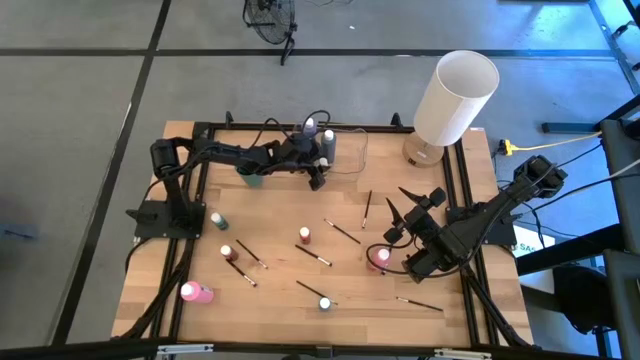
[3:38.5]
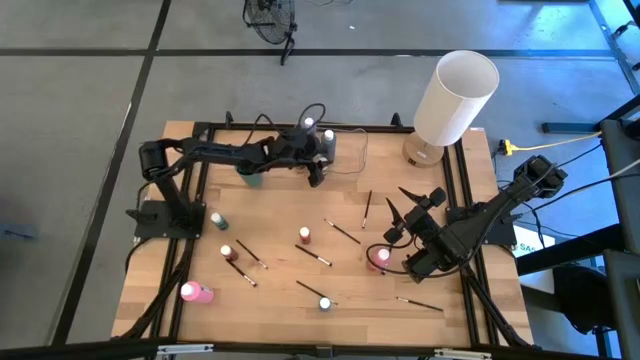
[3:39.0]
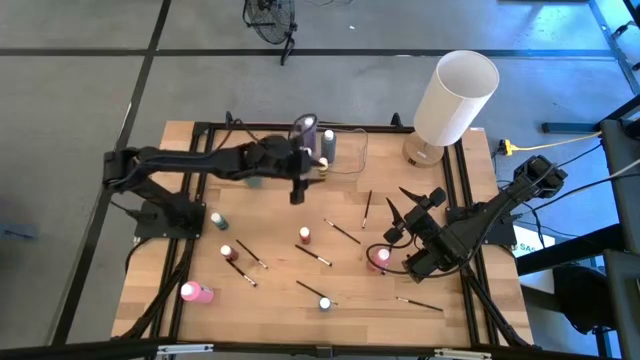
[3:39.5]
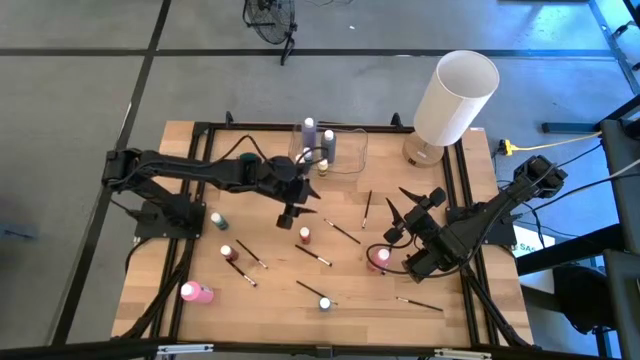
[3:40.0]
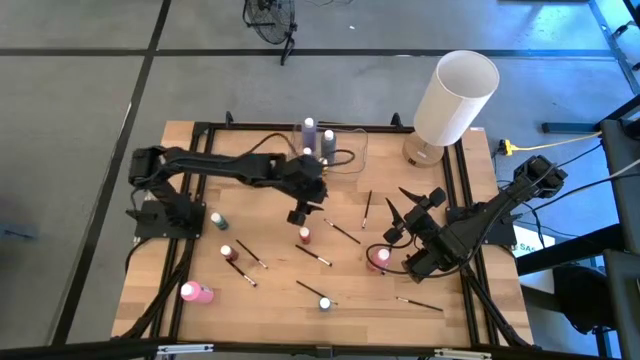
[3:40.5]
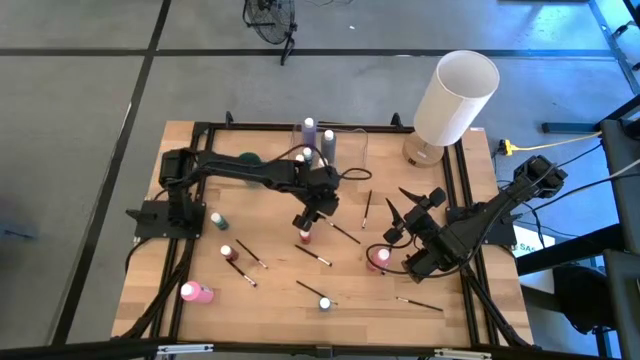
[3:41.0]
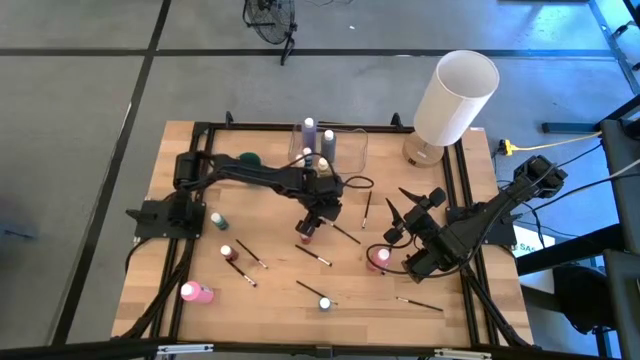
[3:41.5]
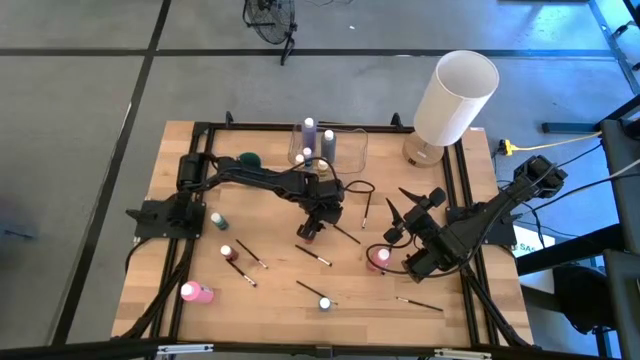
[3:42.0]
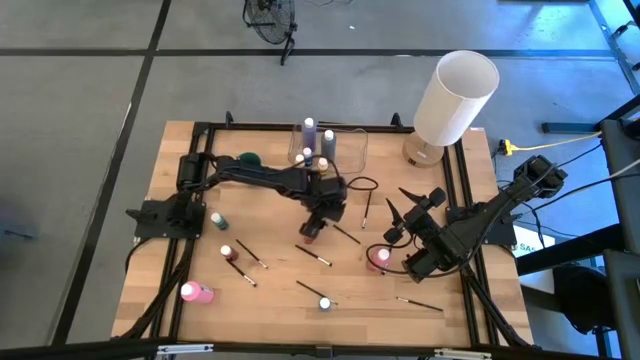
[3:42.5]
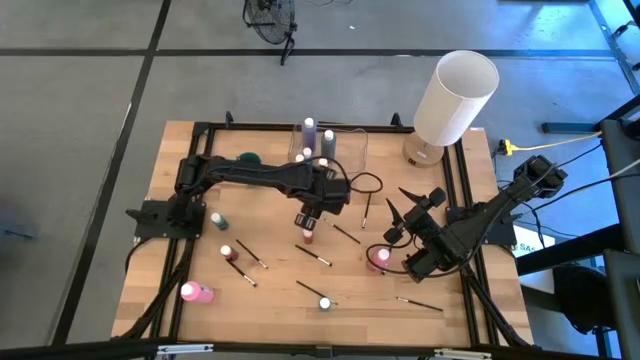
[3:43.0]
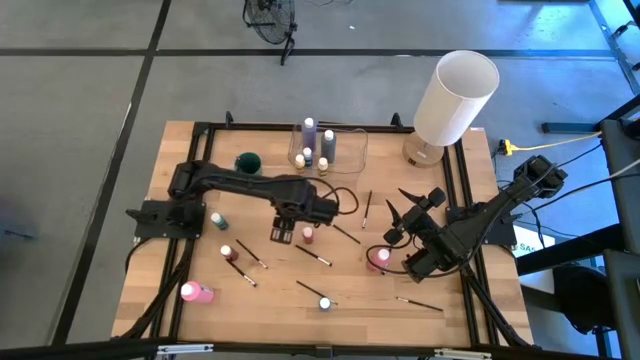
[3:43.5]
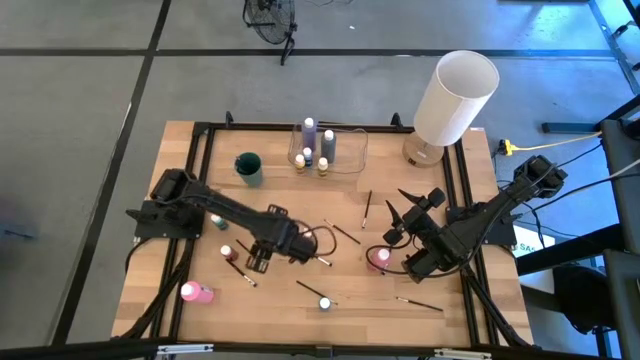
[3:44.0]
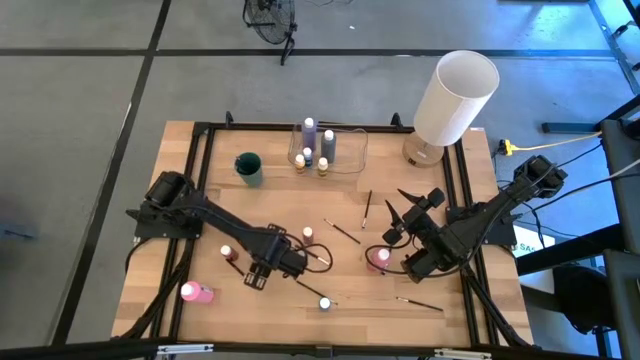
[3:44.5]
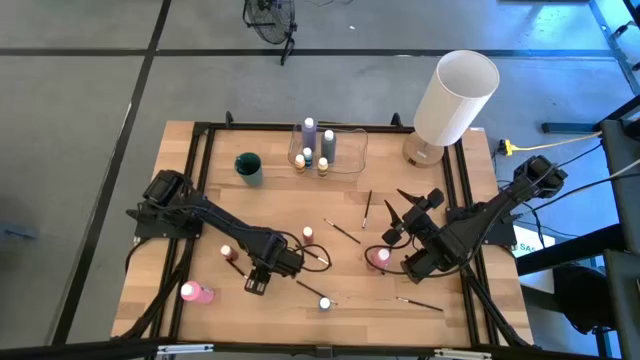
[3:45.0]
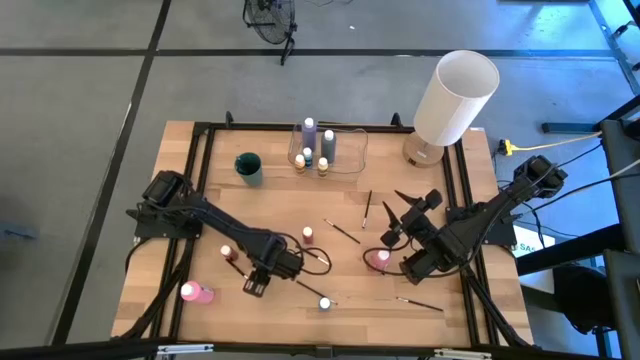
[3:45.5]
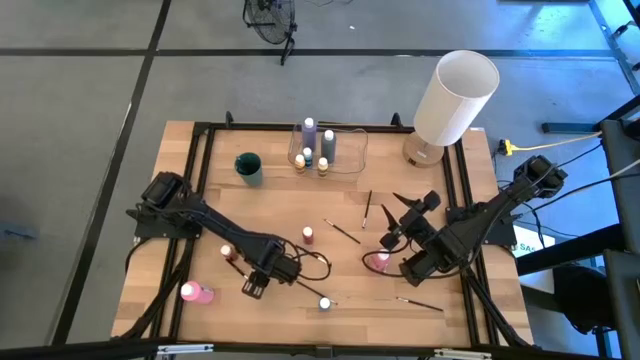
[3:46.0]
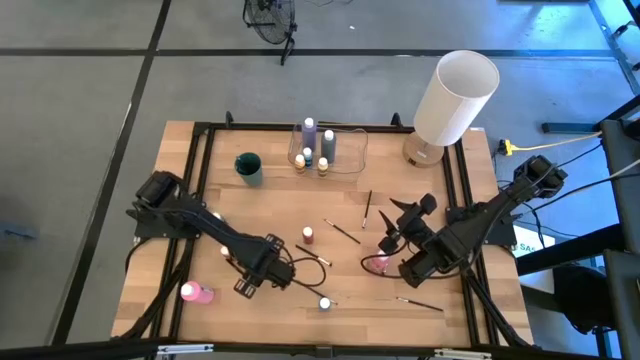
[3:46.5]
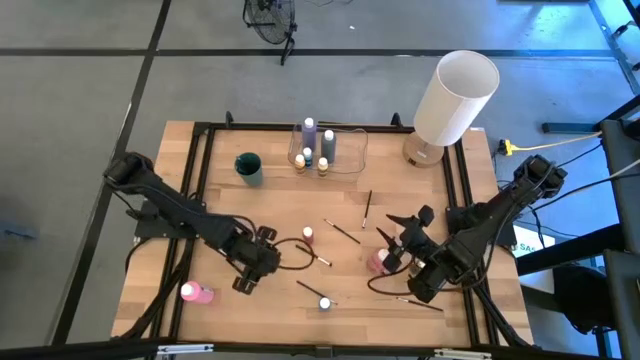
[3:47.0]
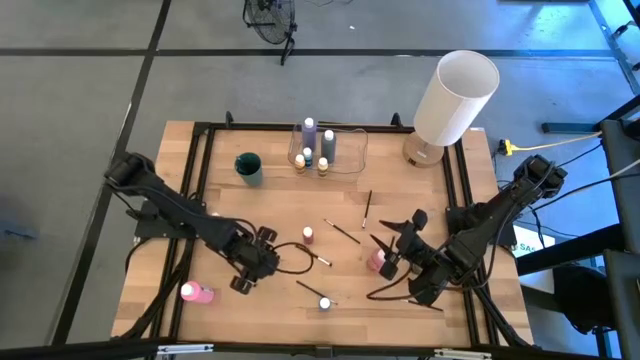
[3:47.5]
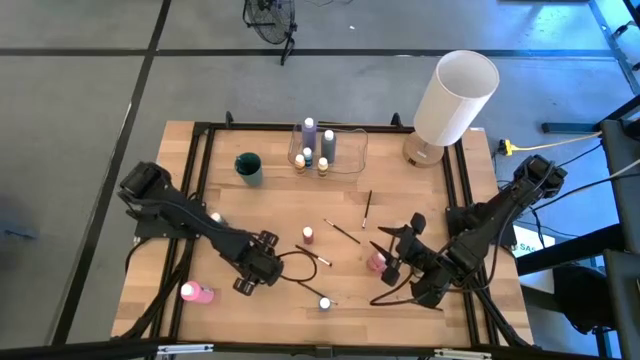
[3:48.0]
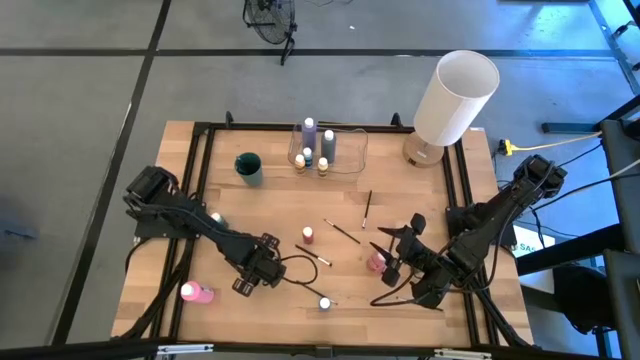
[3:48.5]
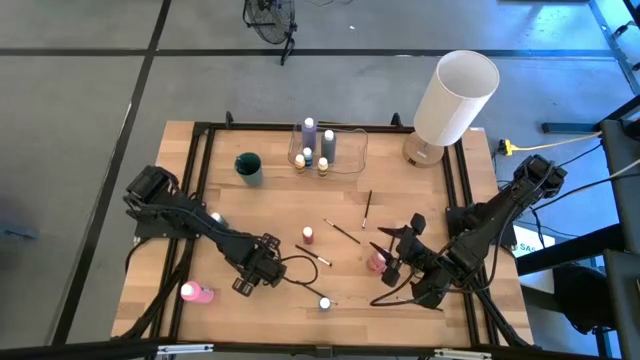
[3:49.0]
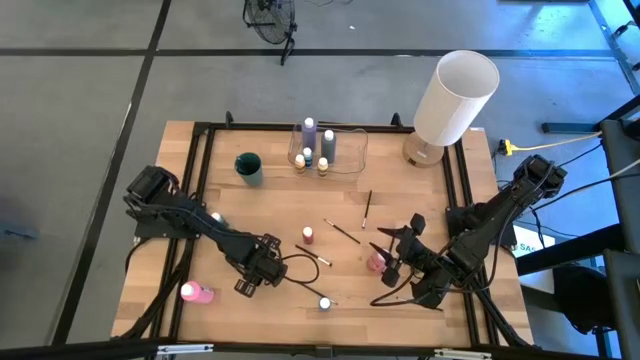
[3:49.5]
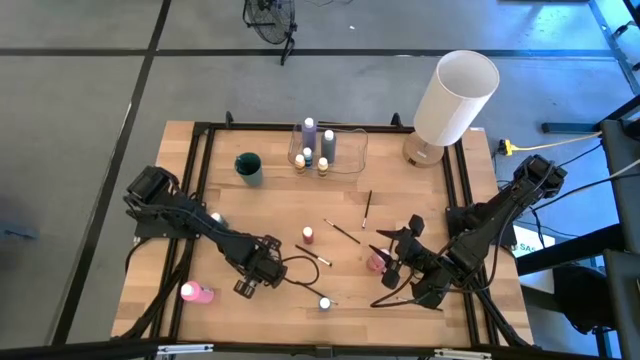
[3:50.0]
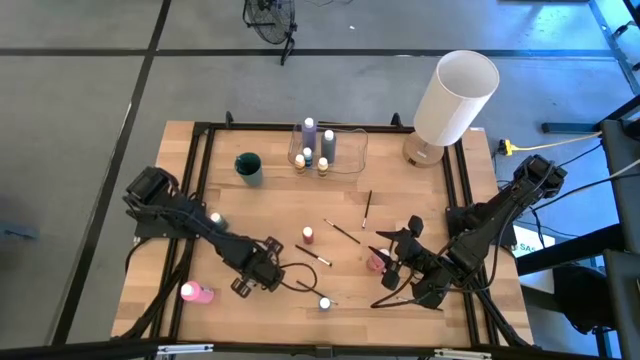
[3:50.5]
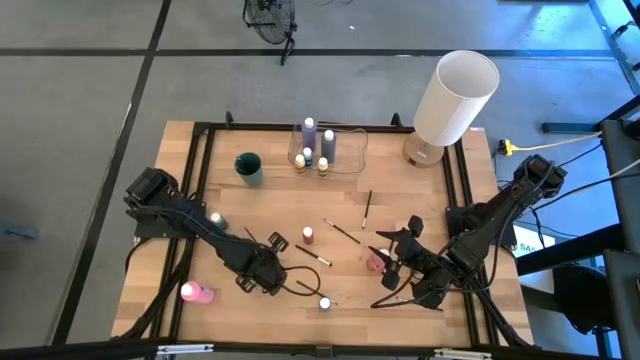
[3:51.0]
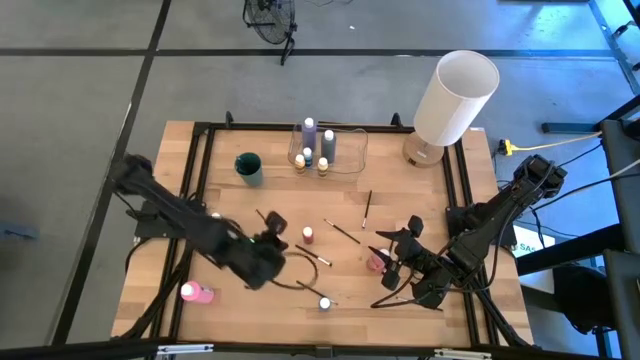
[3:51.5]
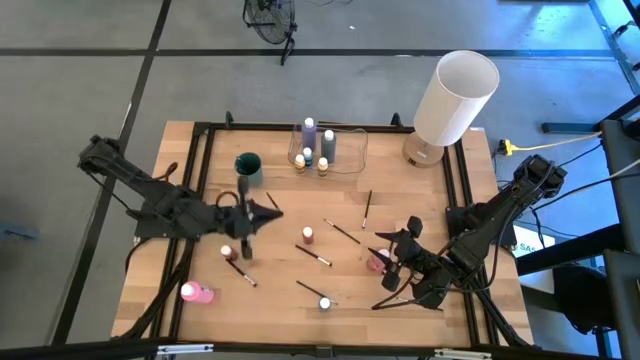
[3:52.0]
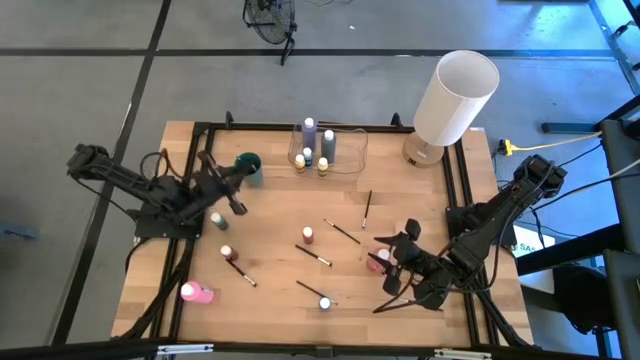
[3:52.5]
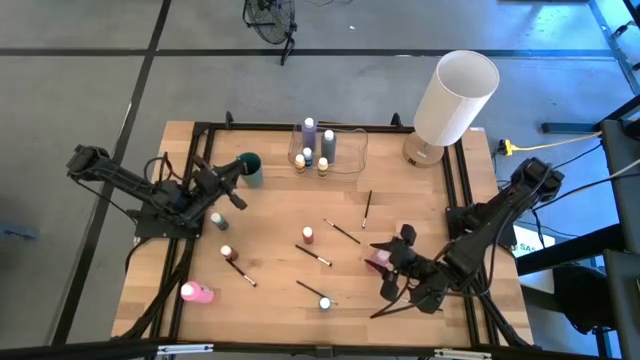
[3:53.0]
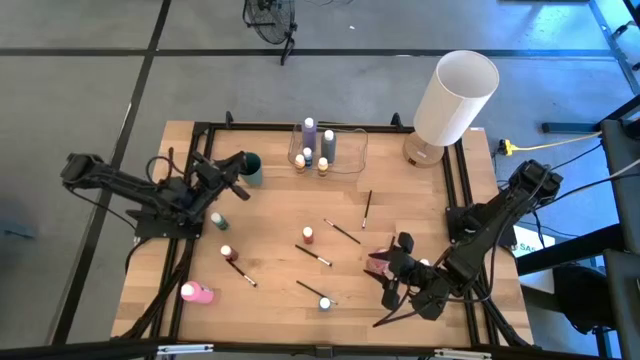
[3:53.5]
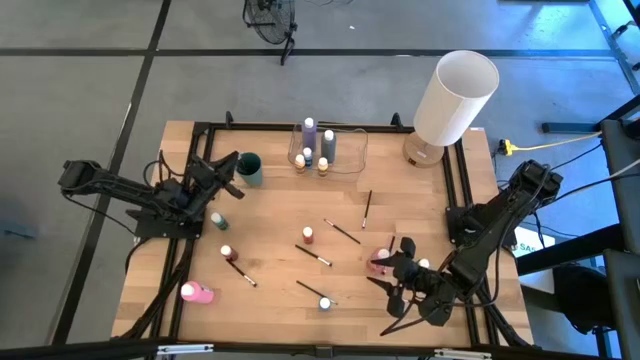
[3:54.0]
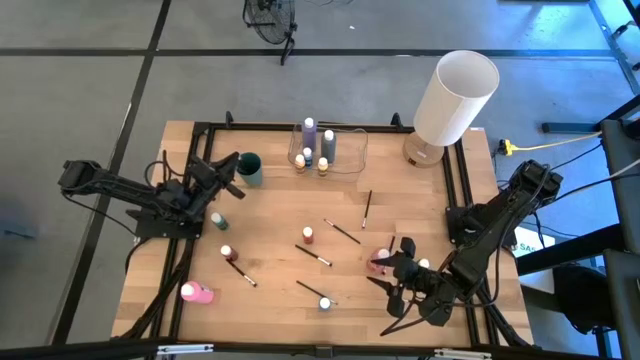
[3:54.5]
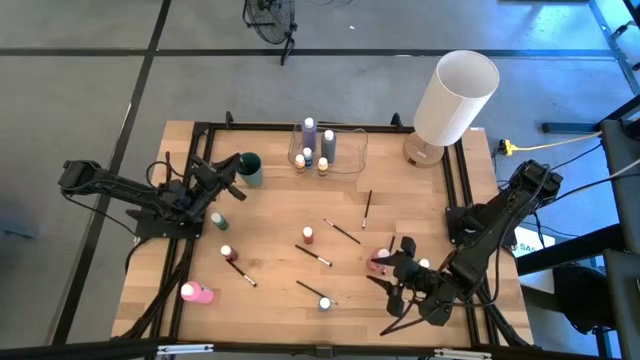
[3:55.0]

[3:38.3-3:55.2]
Task: Pick & Place Paint Supplies
Put the silver paint brush into the green cup

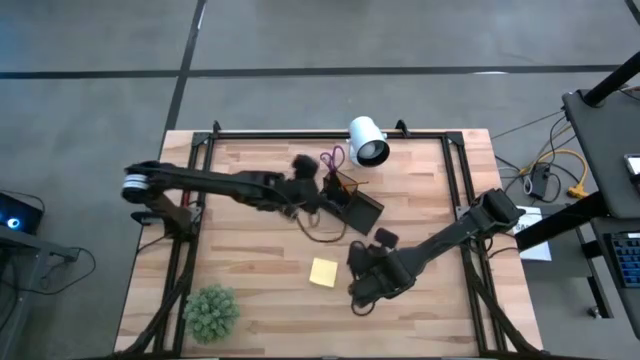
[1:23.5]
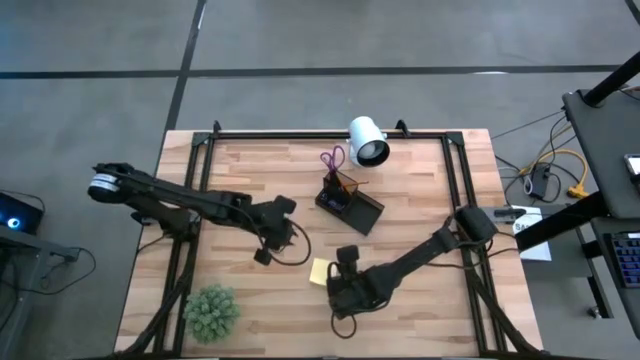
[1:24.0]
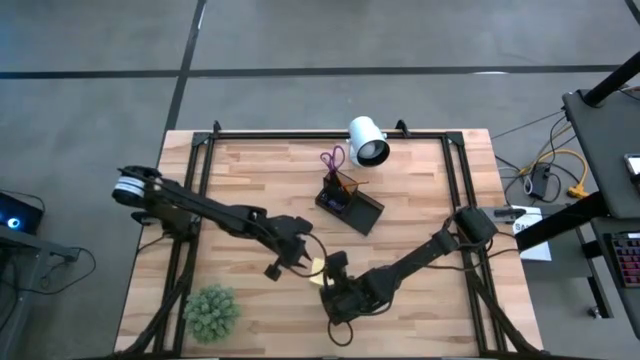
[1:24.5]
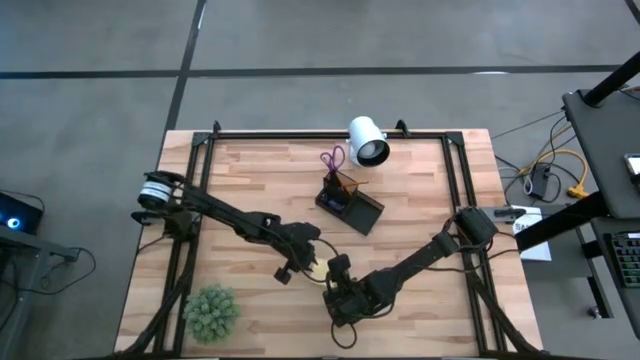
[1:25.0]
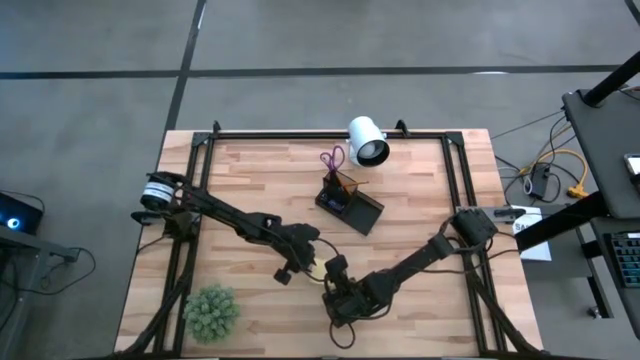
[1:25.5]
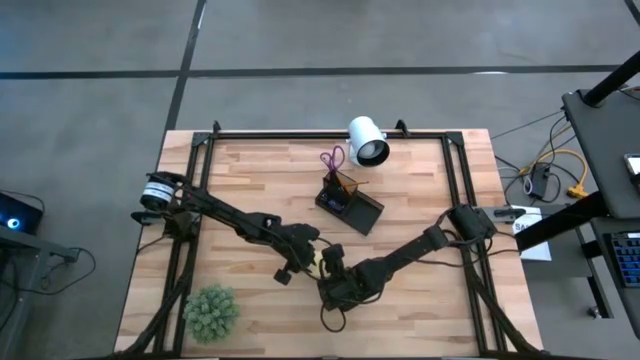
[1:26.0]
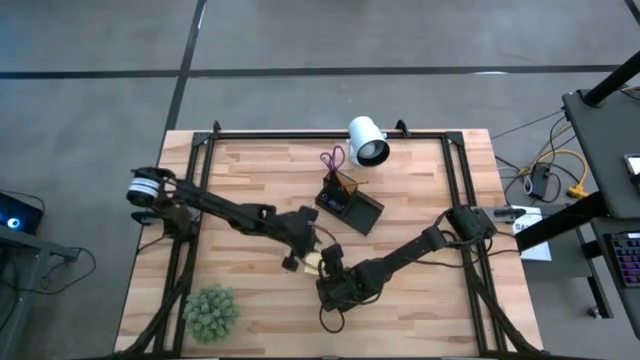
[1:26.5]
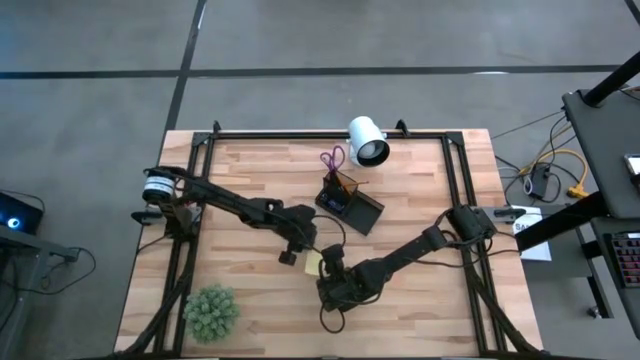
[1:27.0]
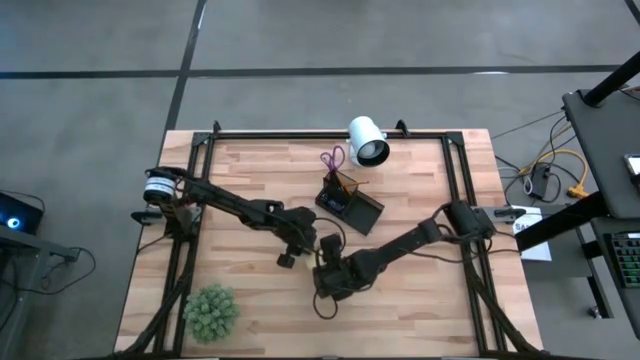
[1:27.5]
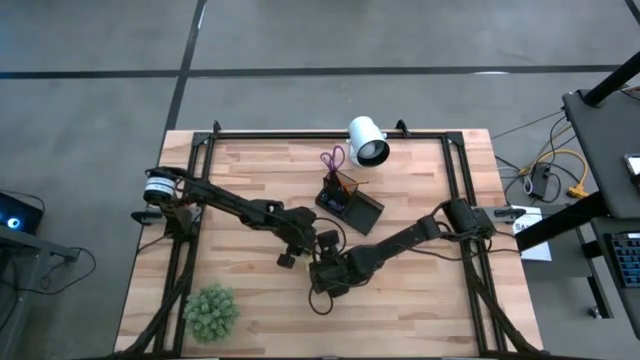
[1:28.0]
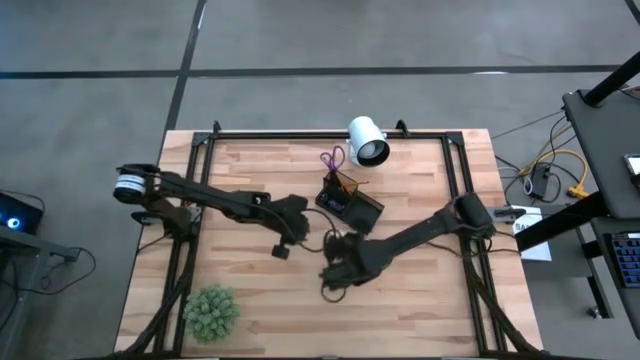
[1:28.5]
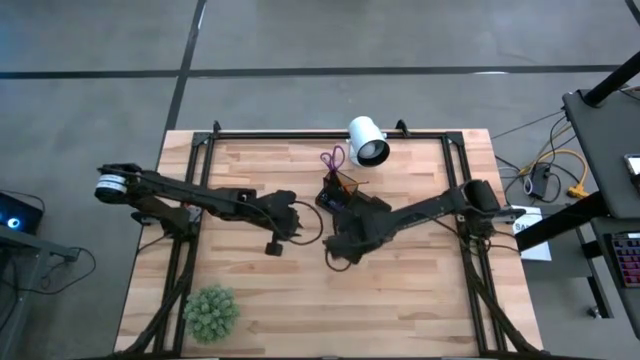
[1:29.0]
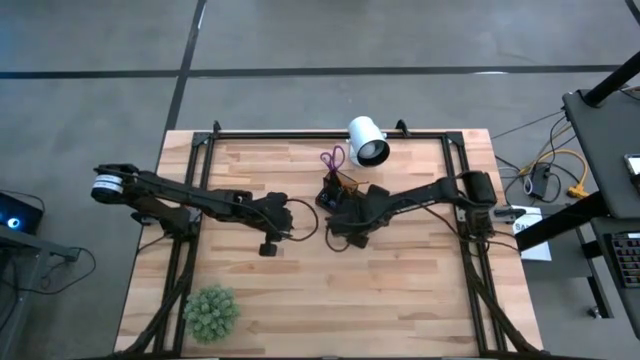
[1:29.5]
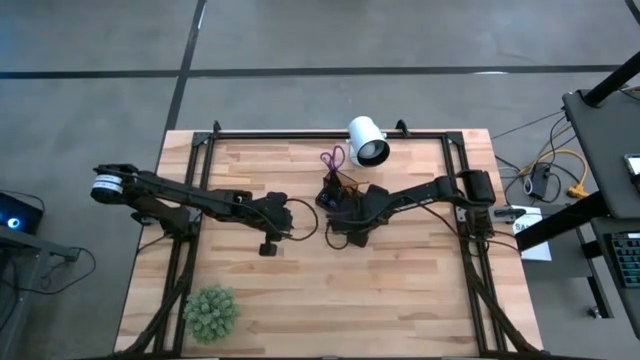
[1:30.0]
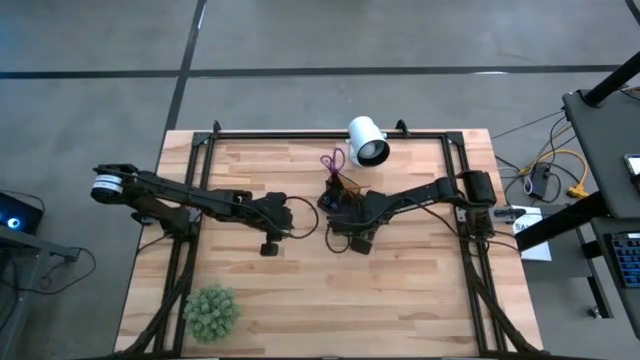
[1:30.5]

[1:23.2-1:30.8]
Task: Pick and place office supplies into organizer
Put the yellow sticky notes into the black mesh organizer
